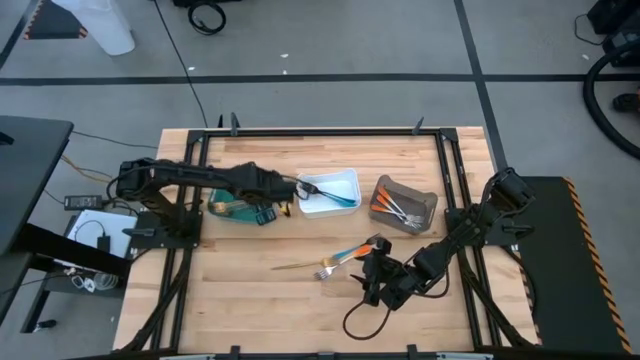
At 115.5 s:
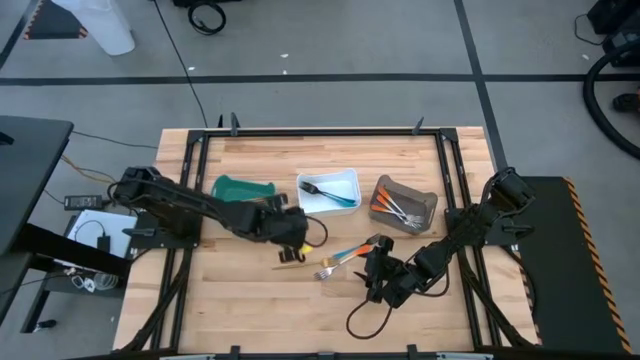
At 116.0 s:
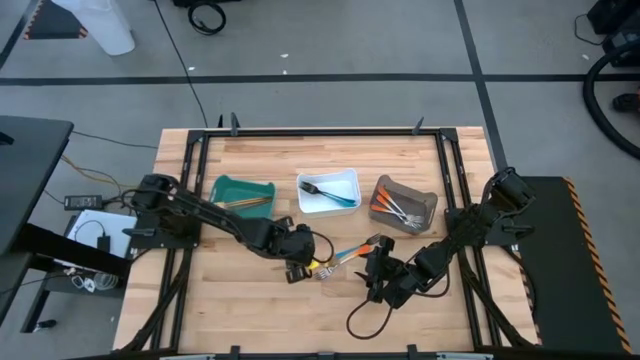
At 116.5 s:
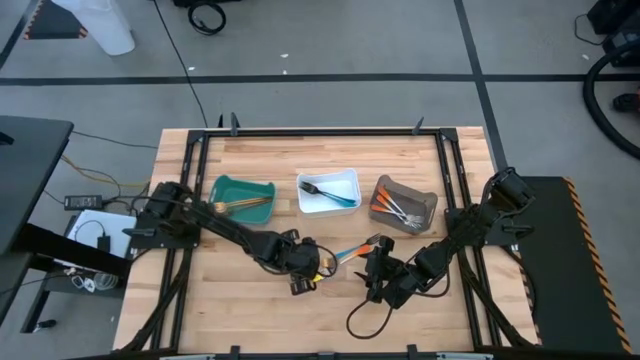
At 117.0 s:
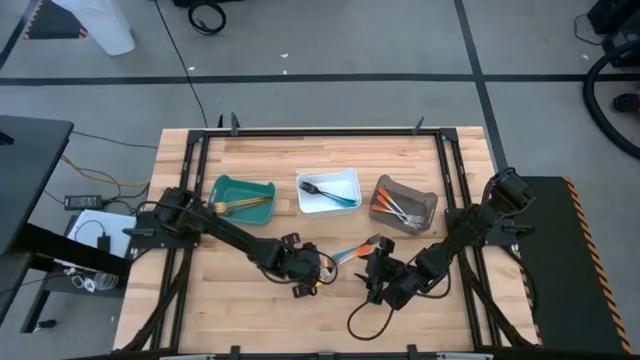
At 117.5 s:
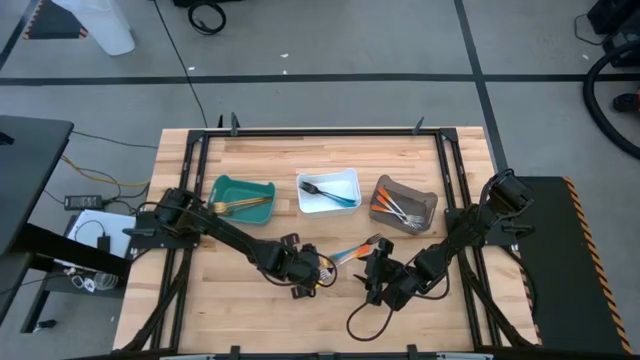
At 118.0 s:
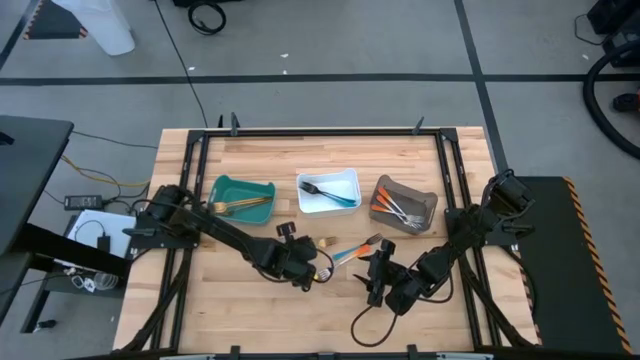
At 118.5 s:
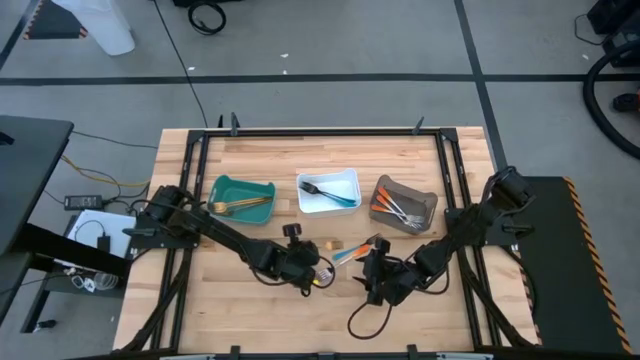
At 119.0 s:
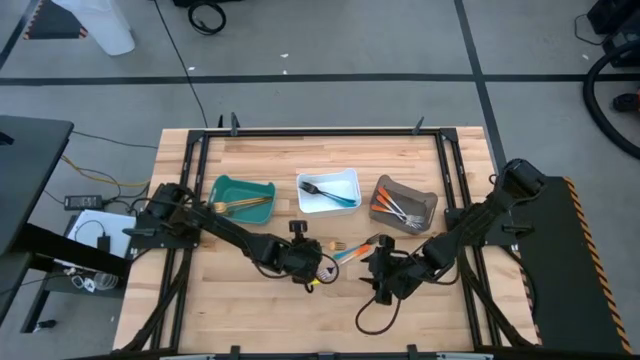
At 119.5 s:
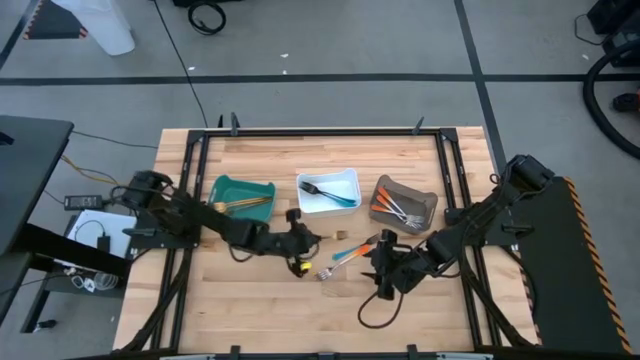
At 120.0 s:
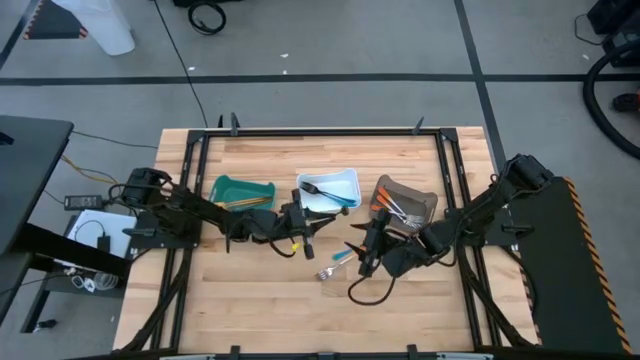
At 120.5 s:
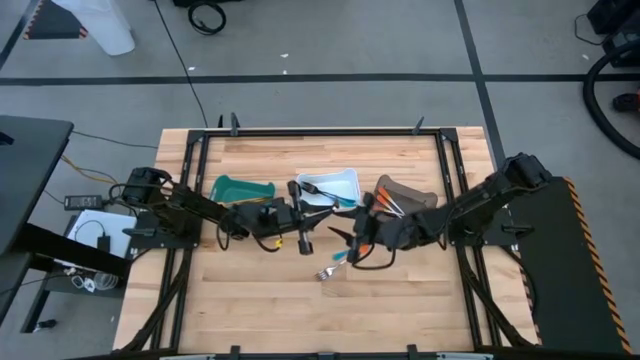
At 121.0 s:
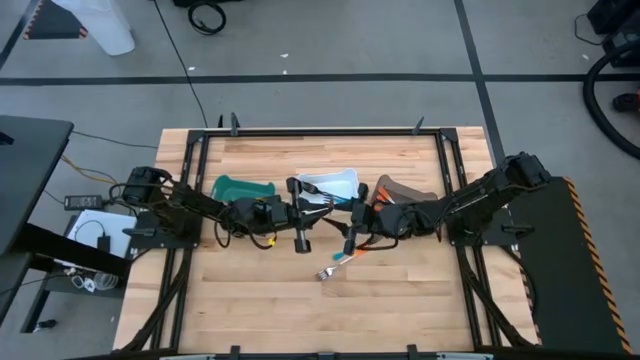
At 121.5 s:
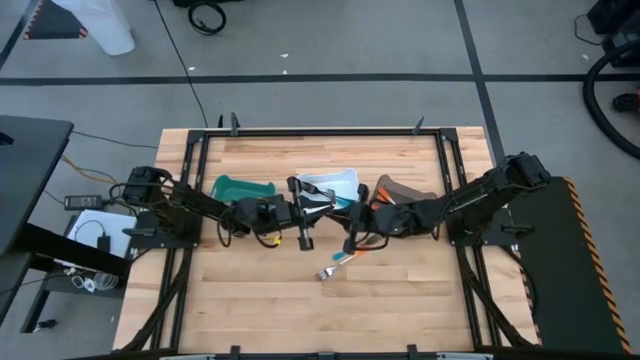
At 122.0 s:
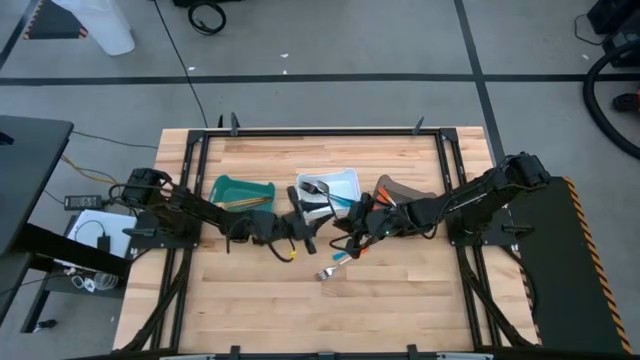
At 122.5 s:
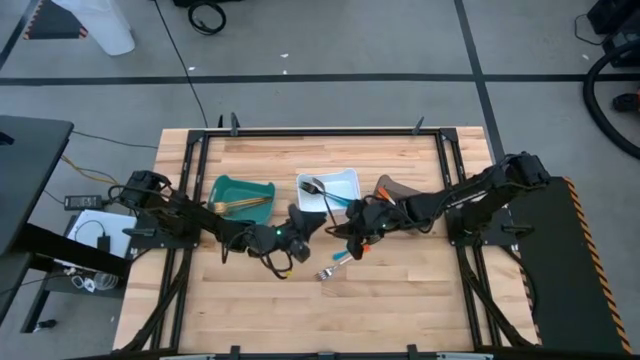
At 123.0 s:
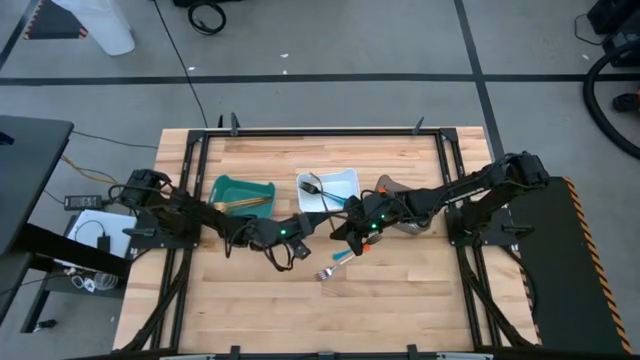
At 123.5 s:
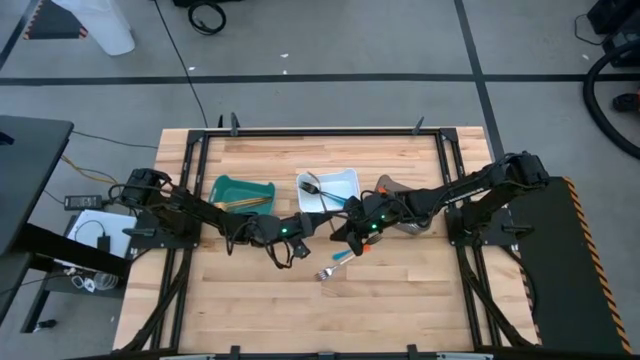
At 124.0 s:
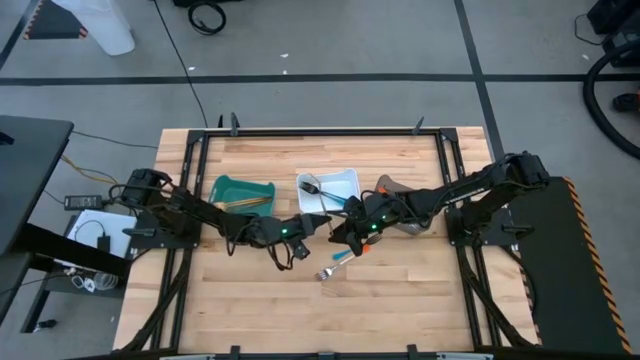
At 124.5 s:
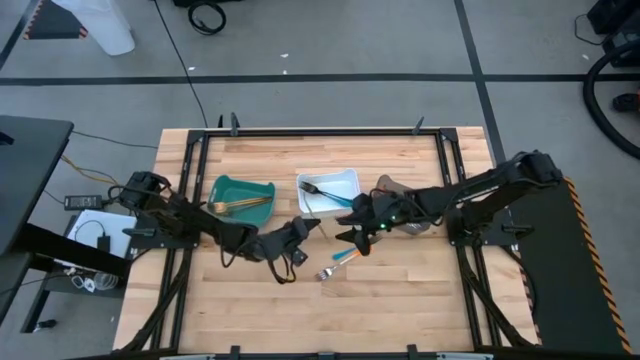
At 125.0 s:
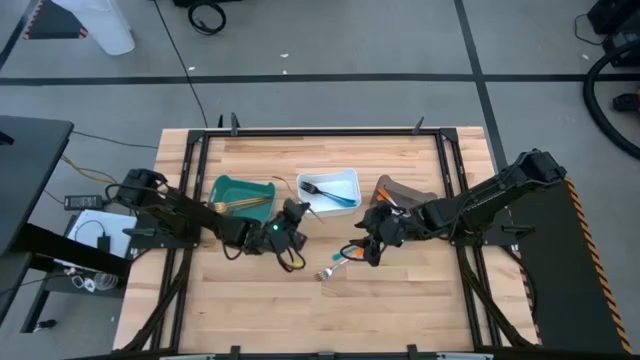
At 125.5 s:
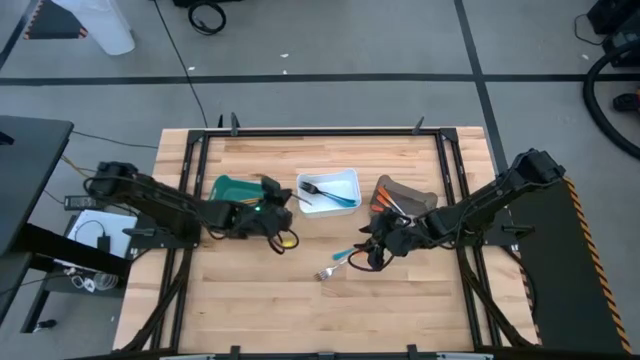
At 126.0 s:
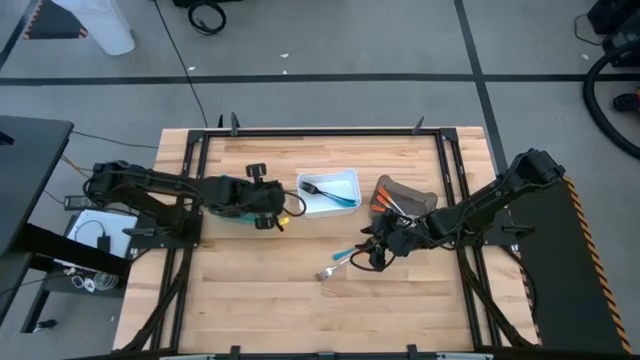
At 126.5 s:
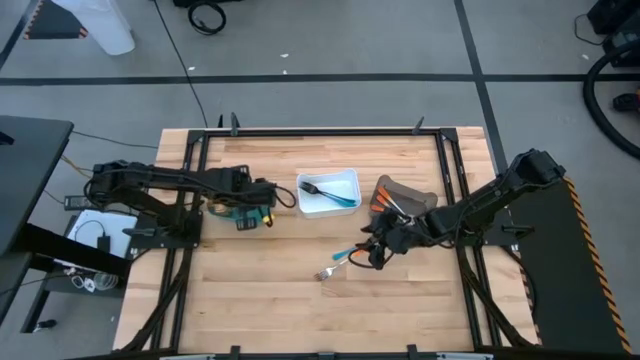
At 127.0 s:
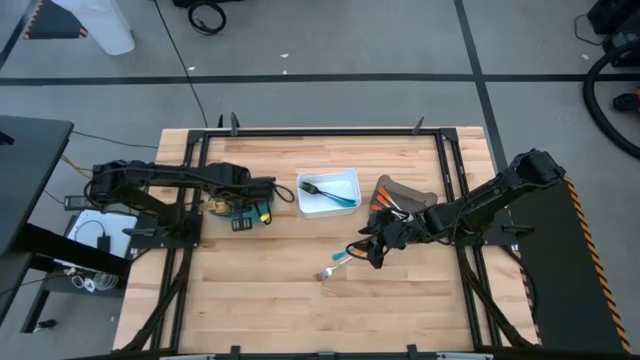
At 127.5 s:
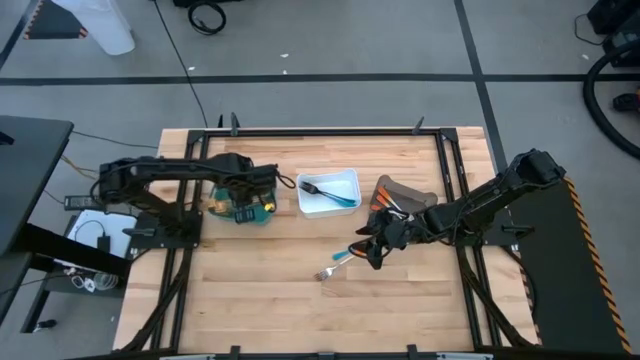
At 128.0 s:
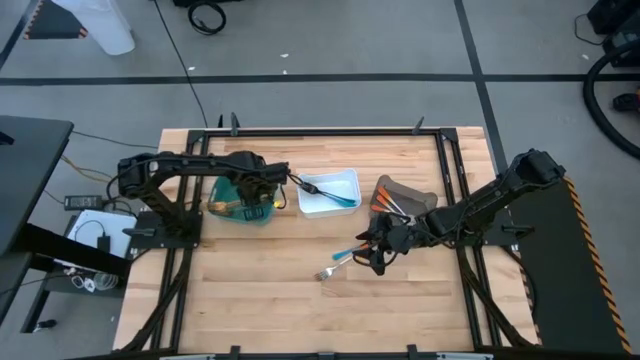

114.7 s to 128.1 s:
Task: Sort silverware by color (type)
Put the gold fork into the green bin

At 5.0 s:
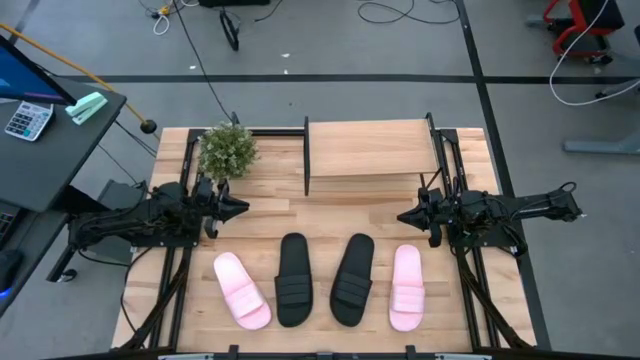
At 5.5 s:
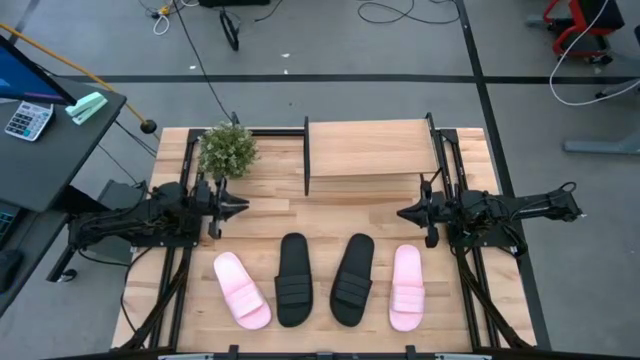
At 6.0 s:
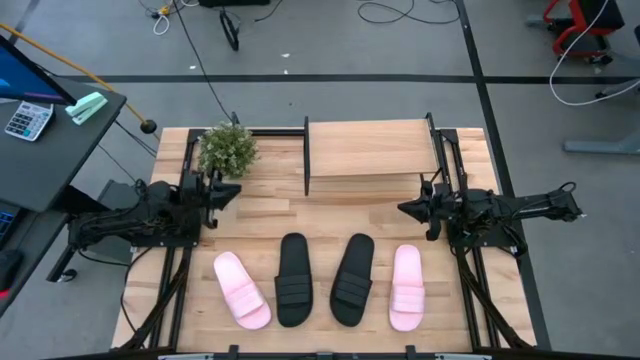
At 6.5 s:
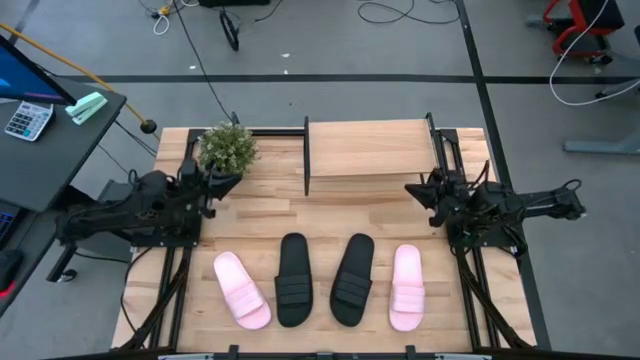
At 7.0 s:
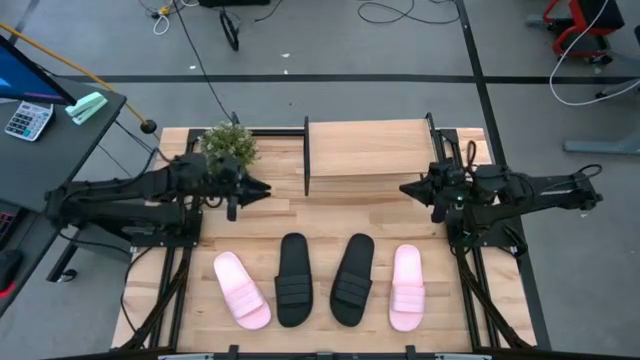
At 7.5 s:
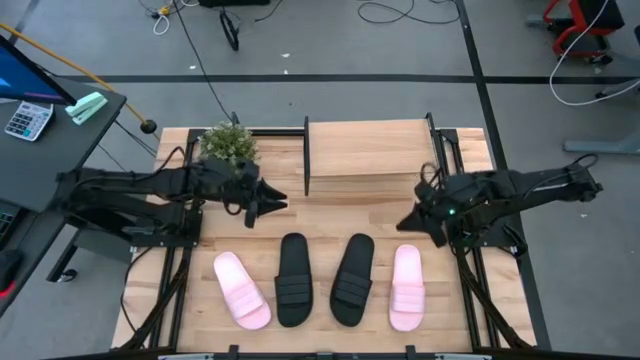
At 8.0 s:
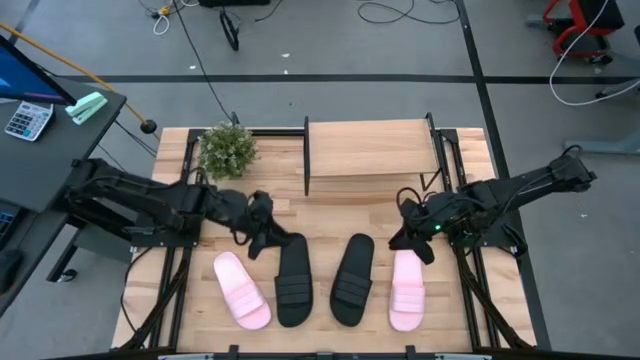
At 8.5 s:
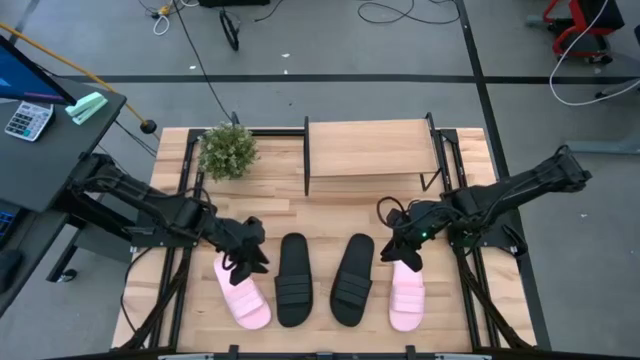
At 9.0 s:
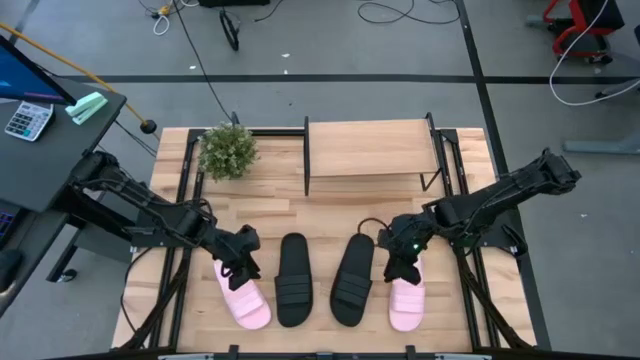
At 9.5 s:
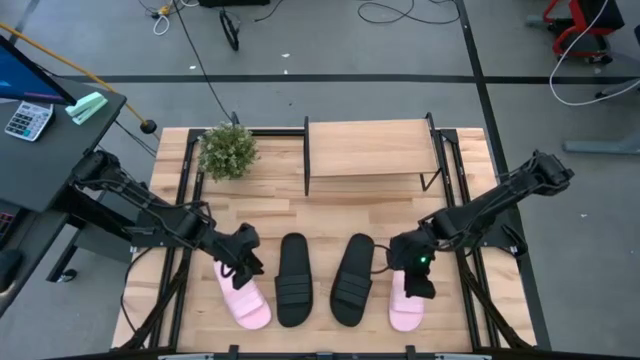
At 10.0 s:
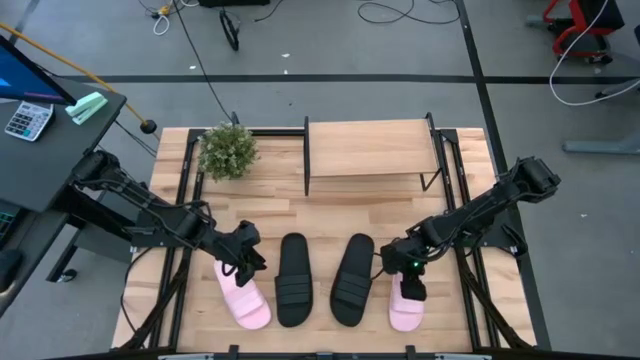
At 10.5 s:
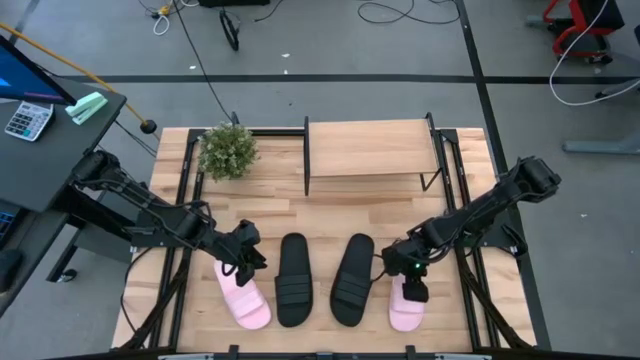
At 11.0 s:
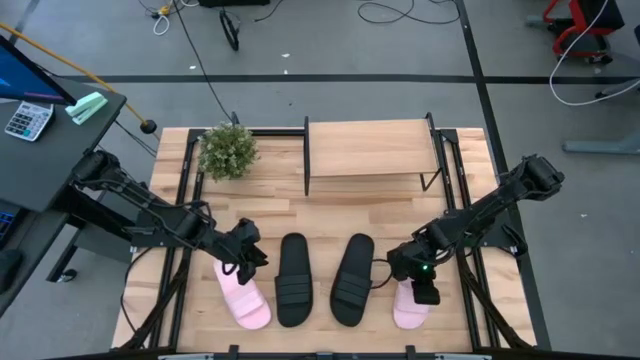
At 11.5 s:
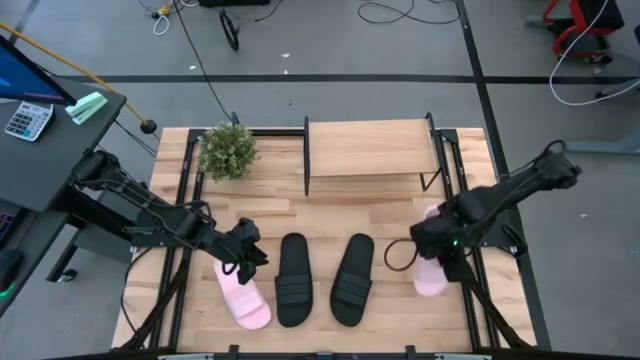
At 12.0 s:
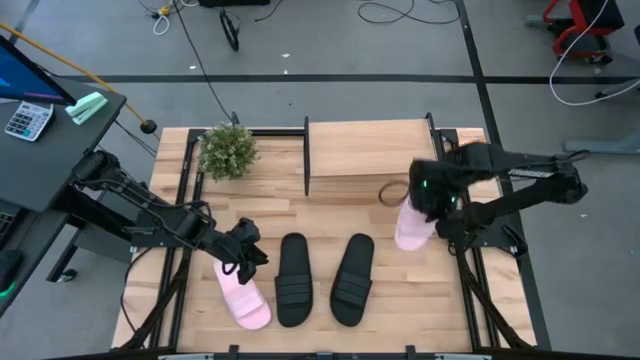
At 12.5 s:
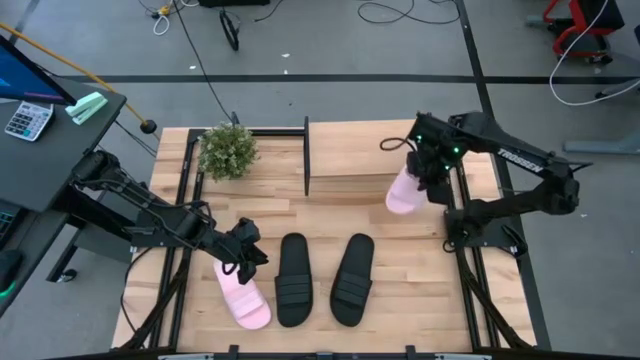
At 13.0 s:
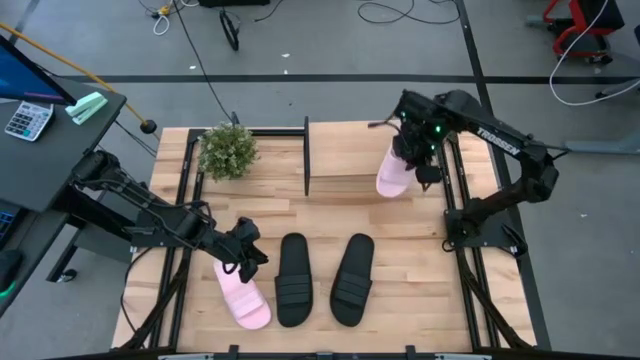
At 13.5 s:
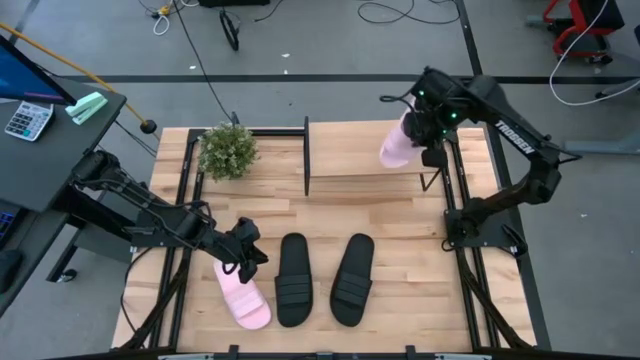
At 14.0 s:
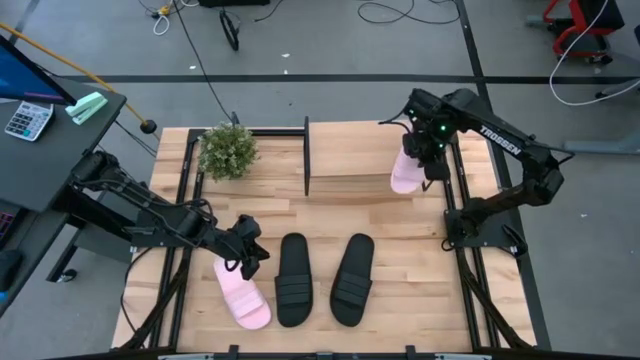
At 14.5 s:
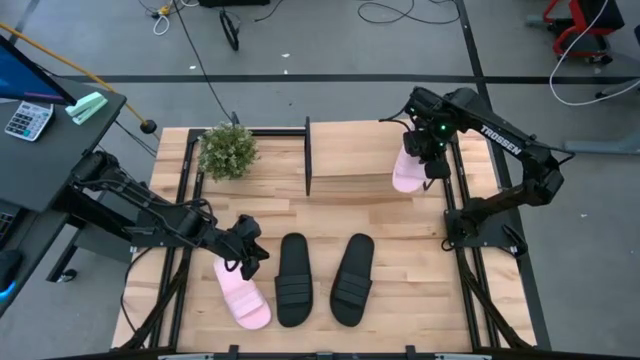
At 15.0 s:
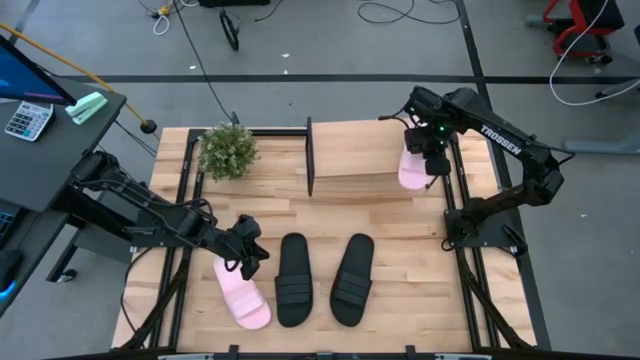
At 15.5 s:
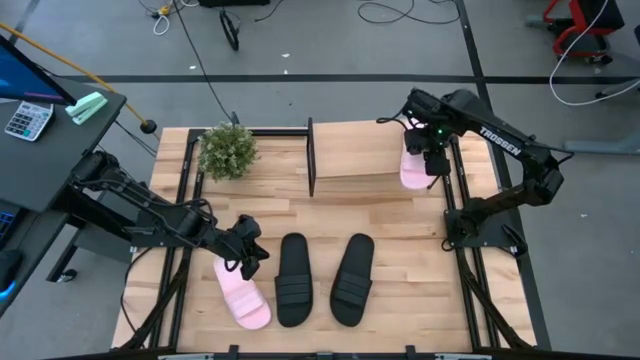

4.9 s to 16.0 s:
Task: Pick and place slides into the shelf
Put the right pink slipper on the shelf
